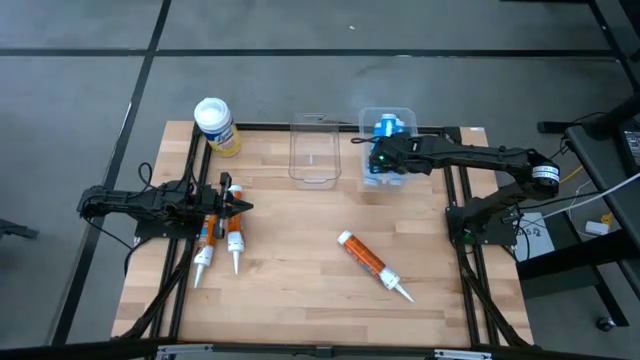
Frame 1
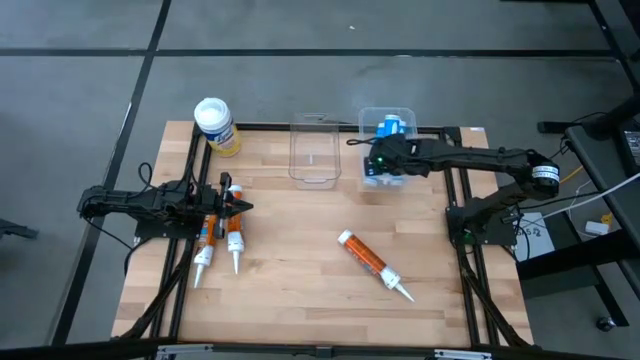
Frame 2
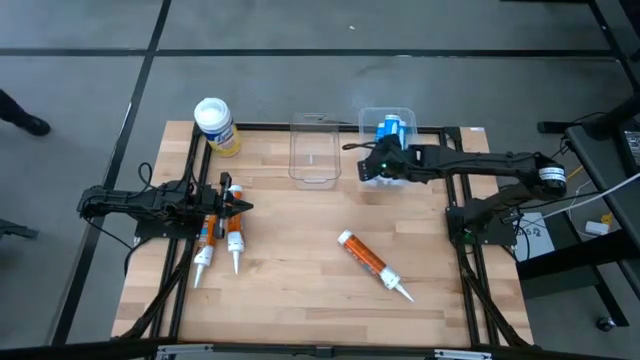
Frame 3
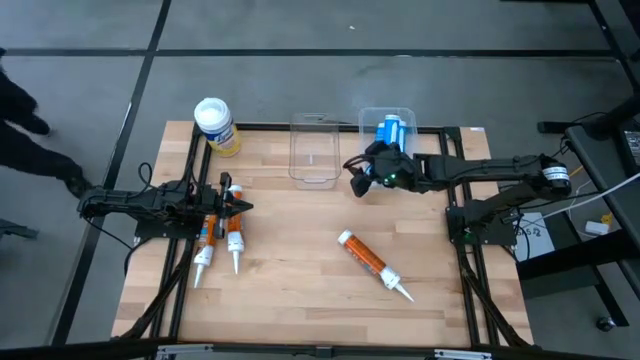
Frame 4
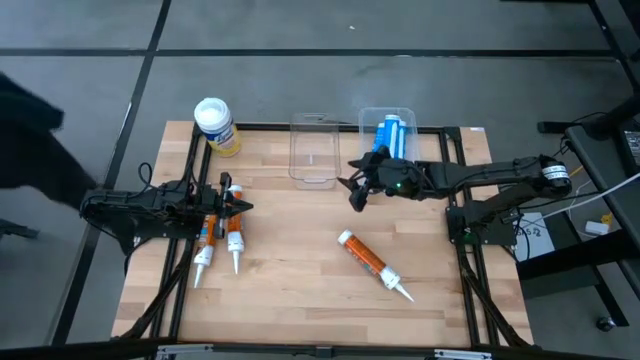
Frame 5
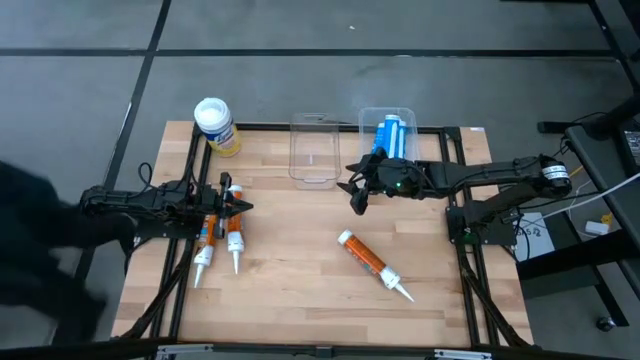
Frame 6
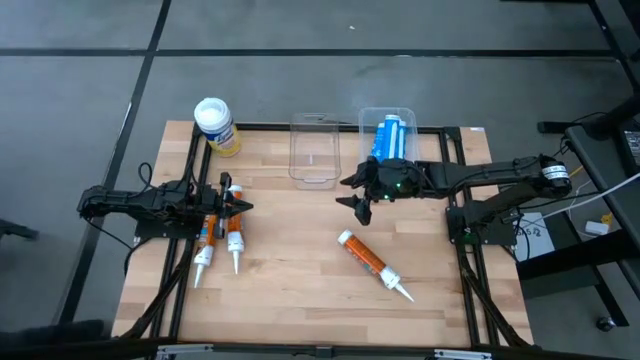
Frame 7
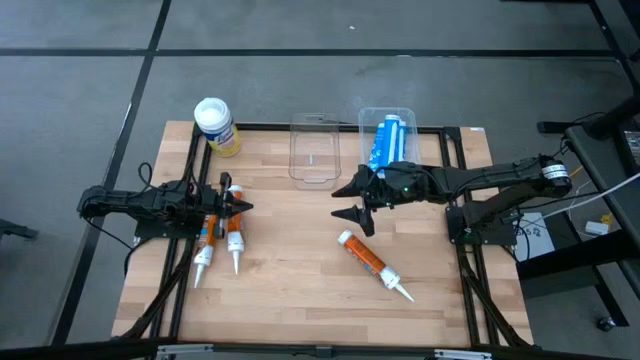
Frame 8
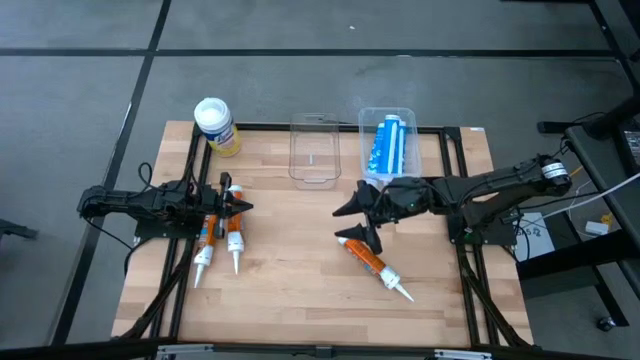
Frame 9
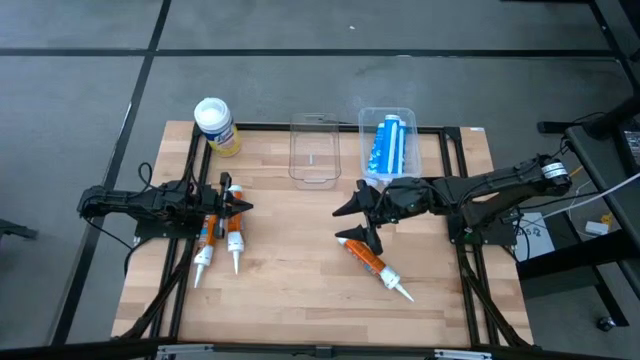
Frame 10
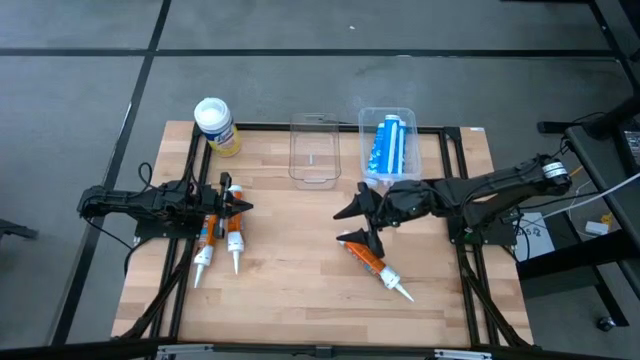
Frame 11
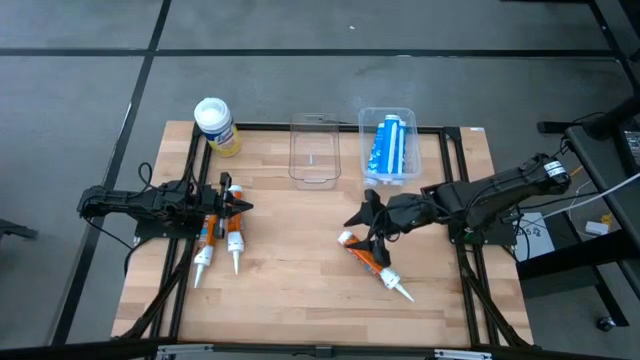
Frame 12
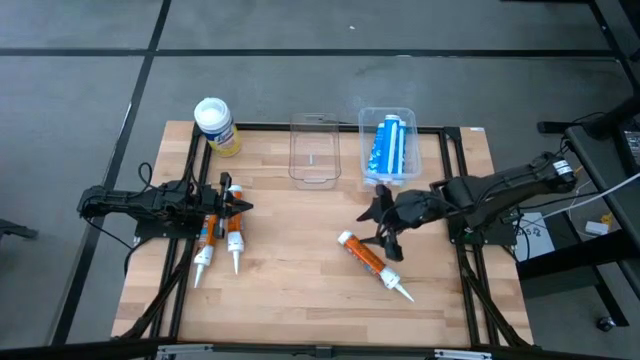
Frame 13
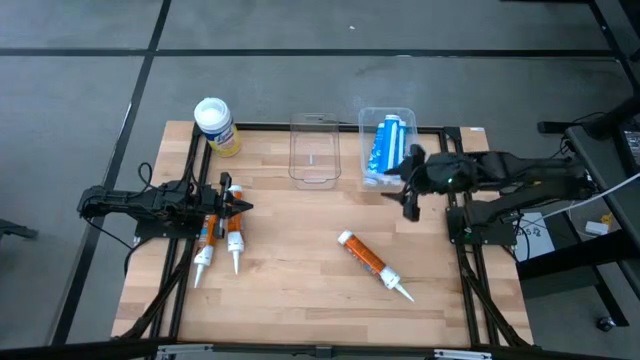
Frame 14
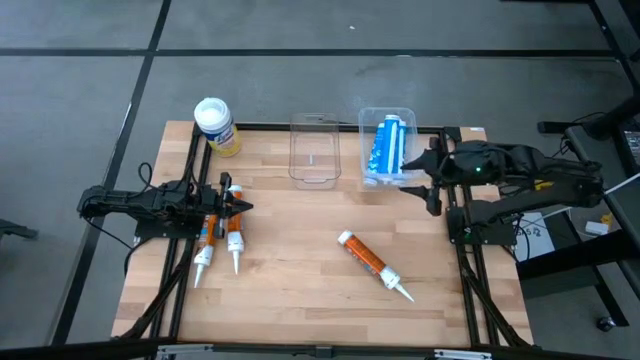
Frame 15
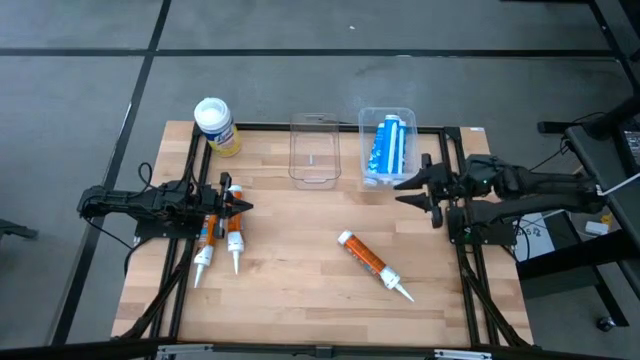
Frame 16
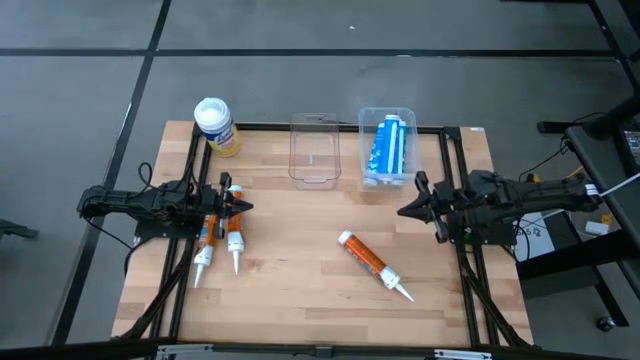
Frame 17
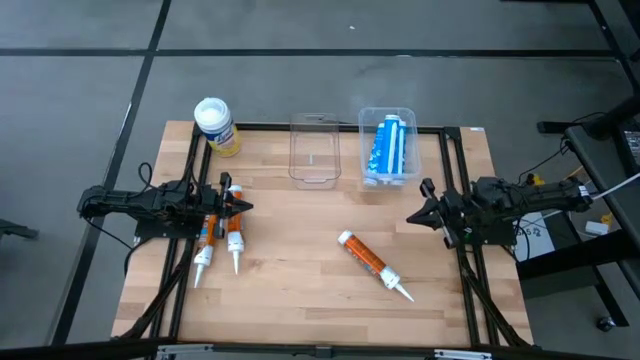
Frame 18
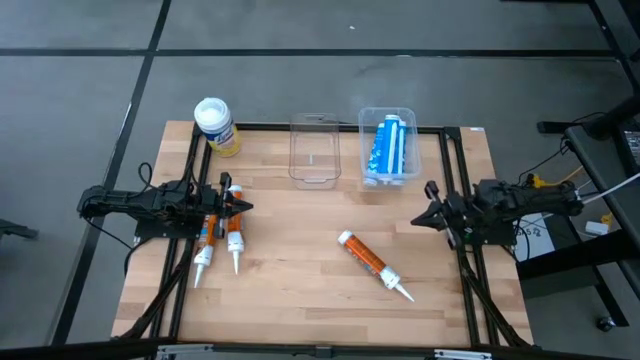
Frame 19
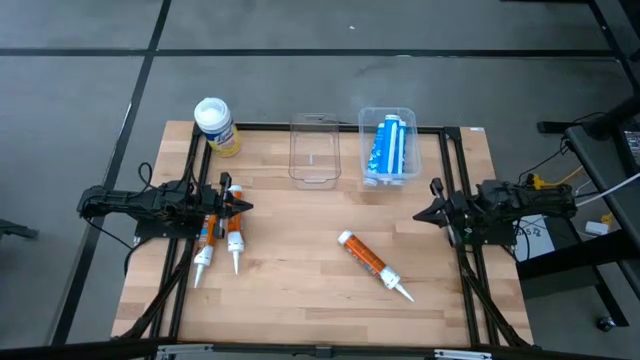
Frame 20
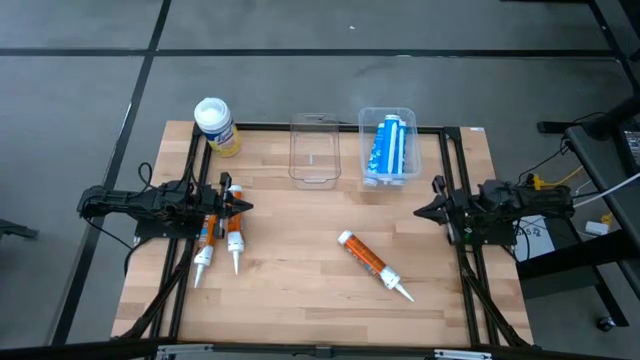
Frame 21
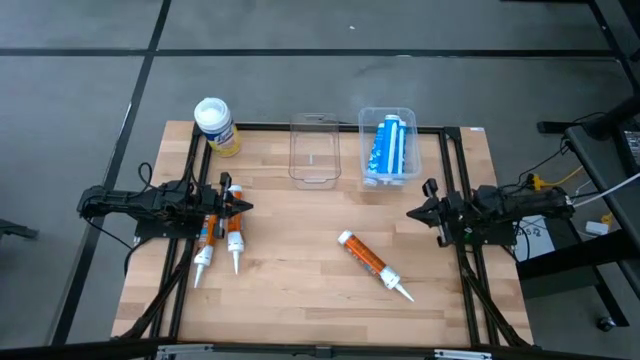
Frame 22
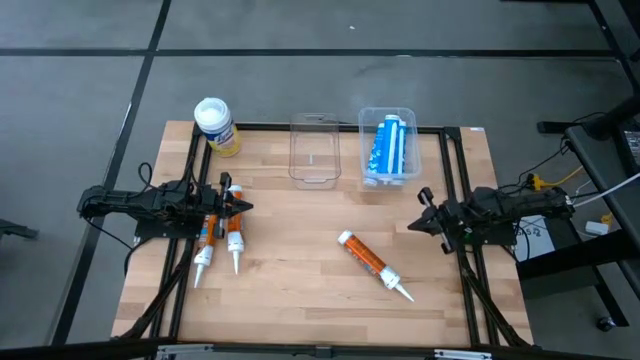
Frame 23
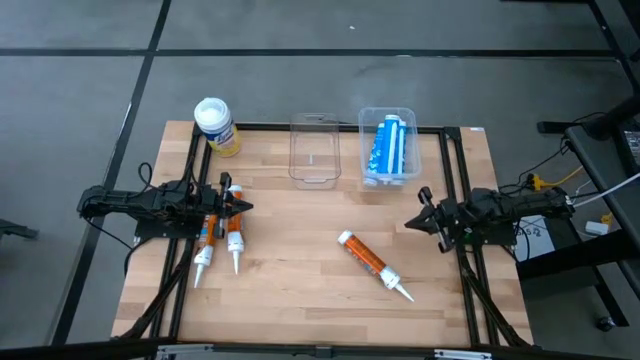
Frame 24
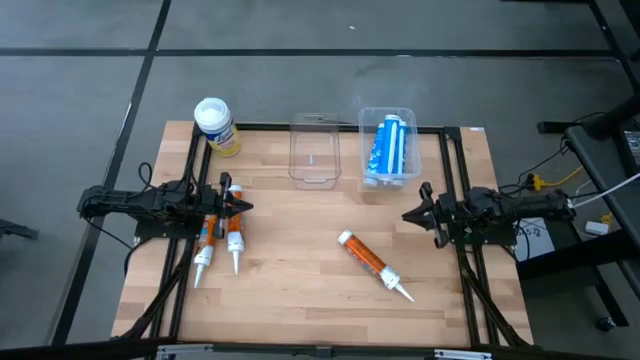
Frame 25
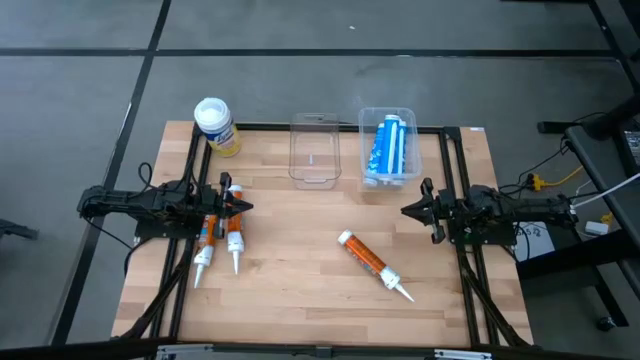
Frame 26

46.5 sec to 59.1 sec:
Task: Pick & place silicon tubes, Sealant and Lysol wipes
Put the middle orange sealant into the left transparent bin

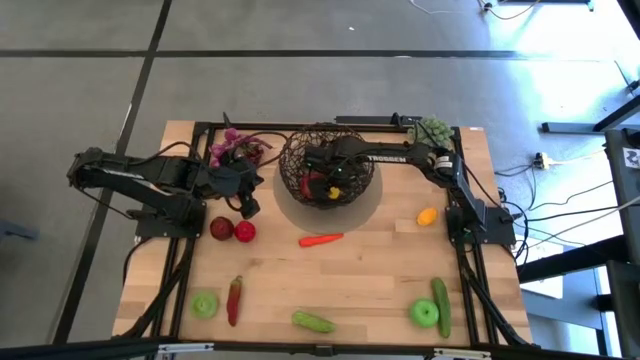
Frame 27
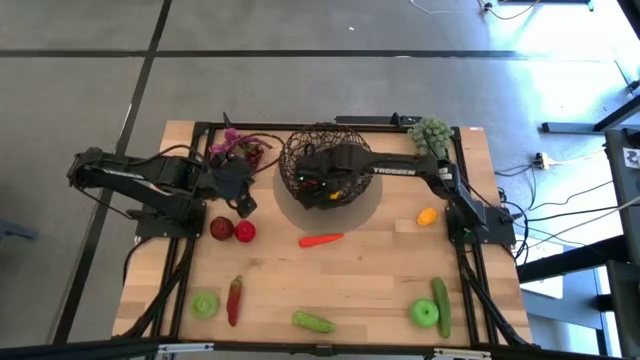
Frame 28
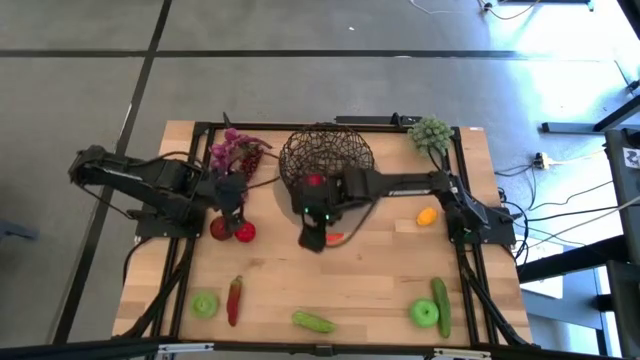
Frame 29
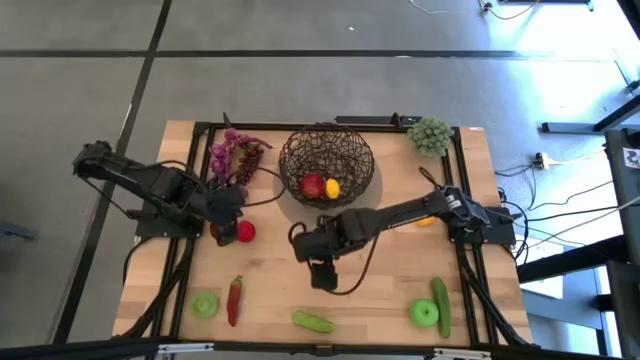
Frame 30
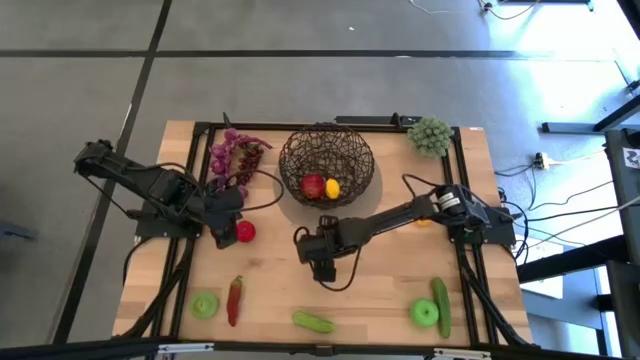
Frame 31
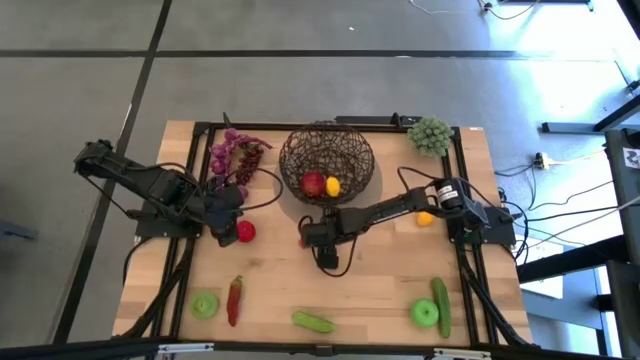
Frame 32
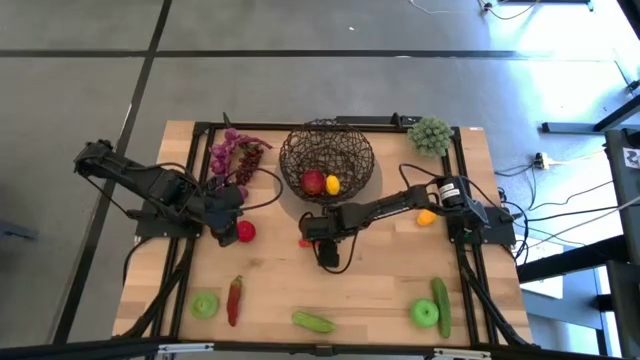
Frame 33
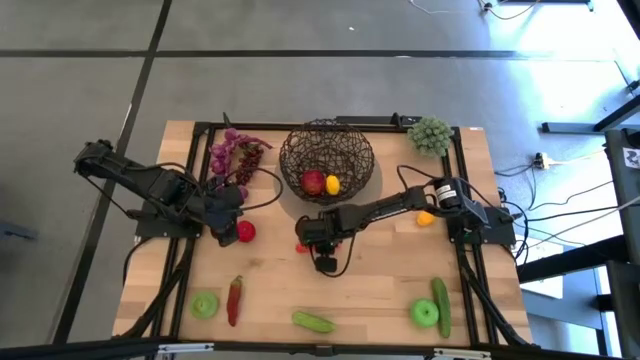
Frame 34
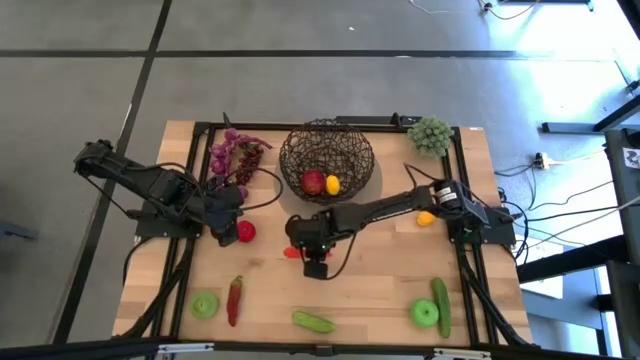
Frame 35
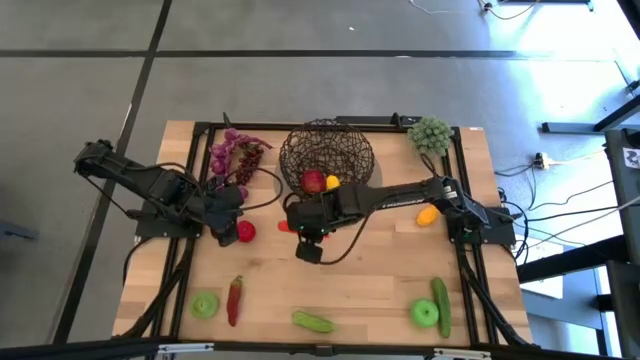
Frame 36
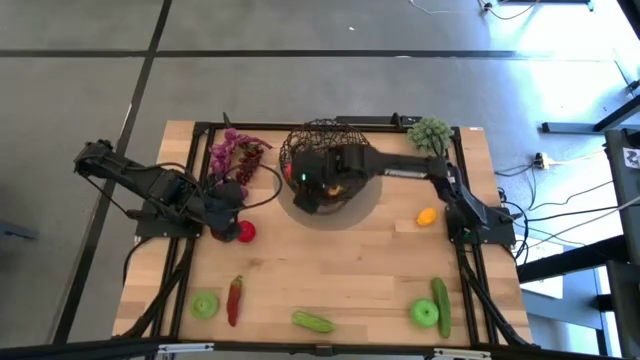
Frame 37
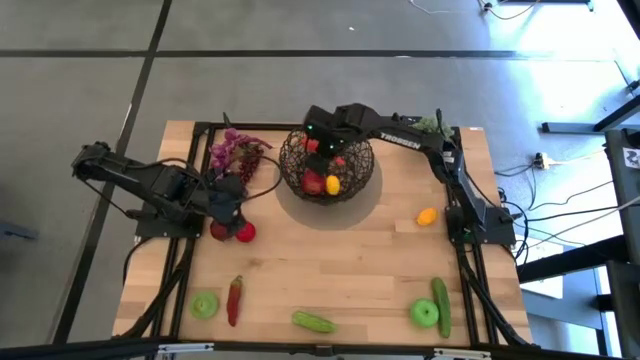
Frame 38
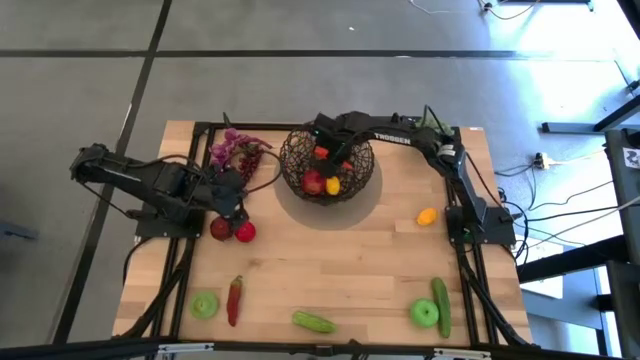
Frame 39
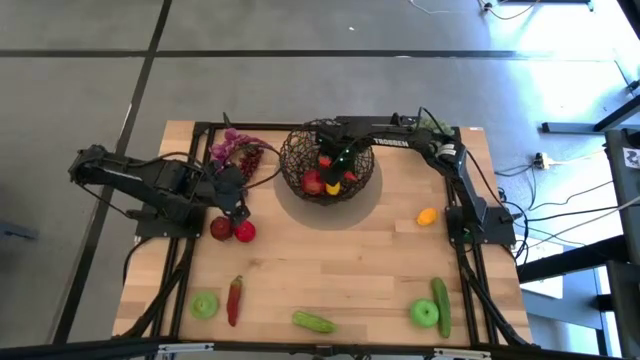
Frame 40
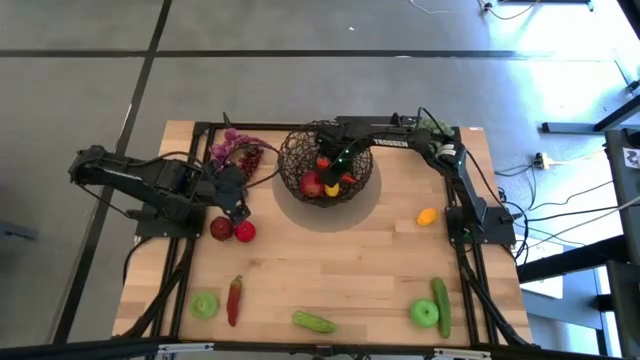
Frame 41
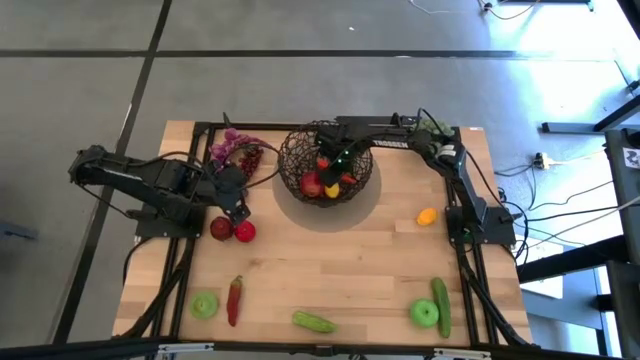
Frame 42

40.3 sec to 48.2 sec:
Task: Build produce basket
Put the carrot into the wire basket
